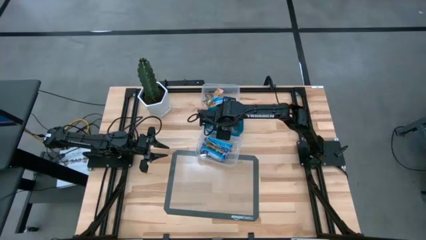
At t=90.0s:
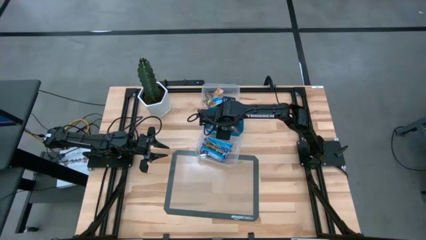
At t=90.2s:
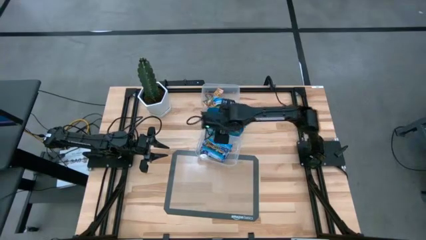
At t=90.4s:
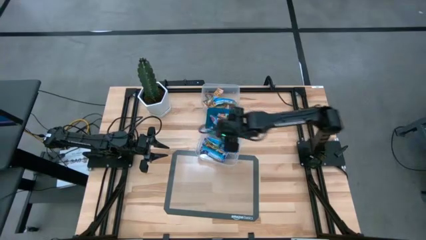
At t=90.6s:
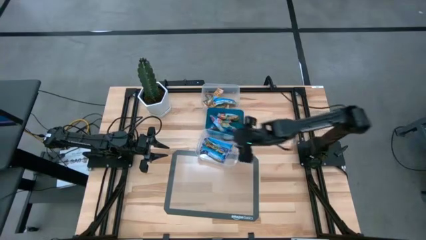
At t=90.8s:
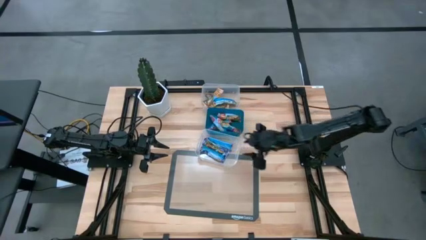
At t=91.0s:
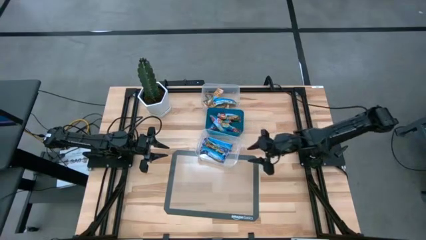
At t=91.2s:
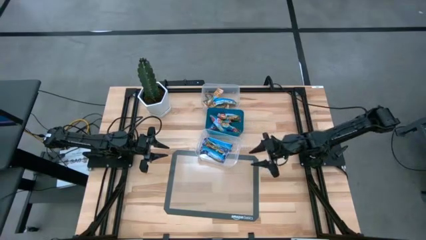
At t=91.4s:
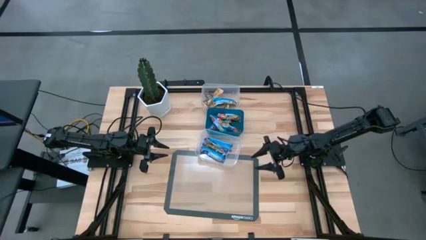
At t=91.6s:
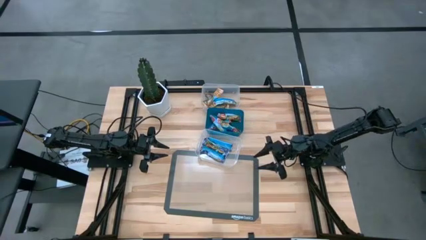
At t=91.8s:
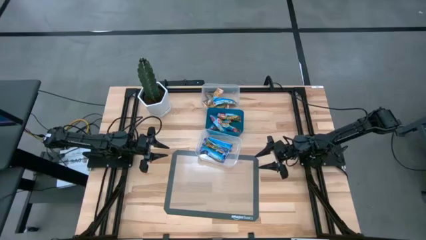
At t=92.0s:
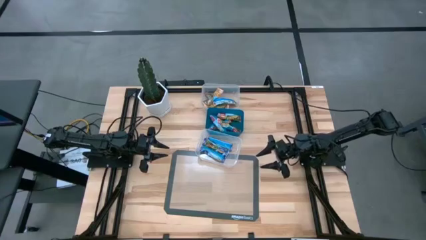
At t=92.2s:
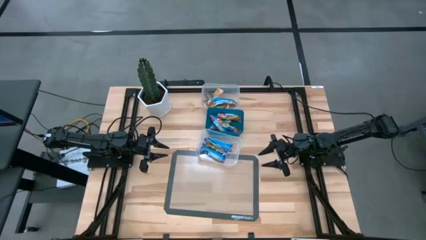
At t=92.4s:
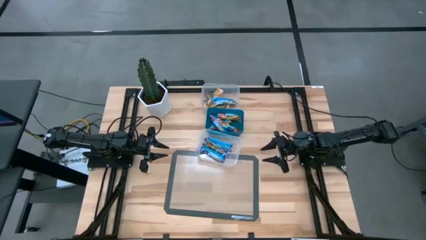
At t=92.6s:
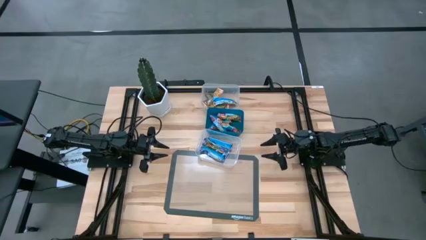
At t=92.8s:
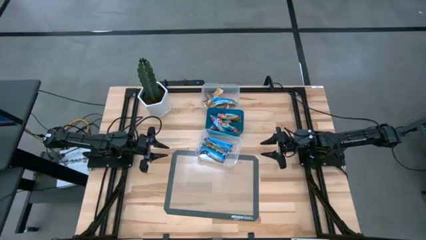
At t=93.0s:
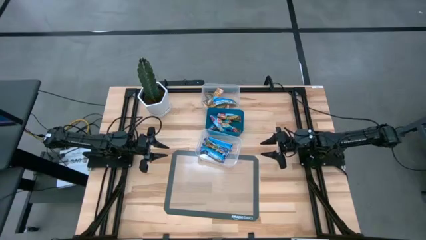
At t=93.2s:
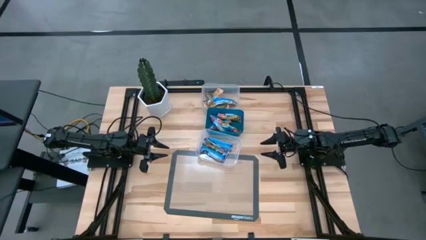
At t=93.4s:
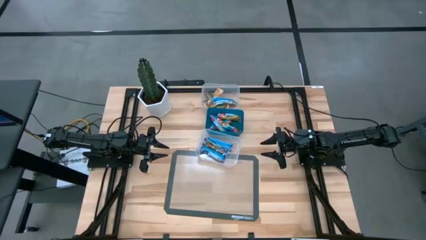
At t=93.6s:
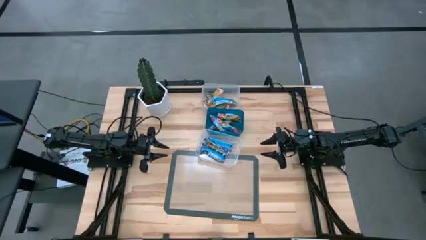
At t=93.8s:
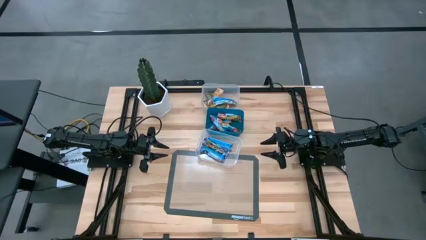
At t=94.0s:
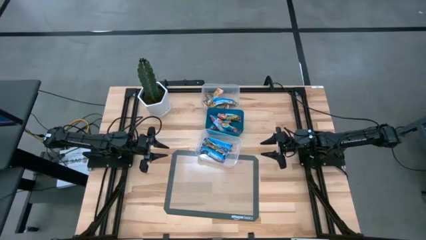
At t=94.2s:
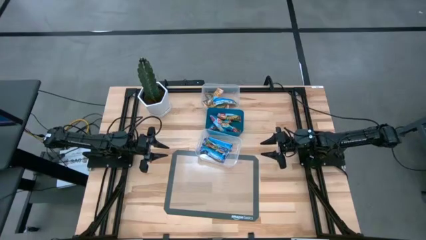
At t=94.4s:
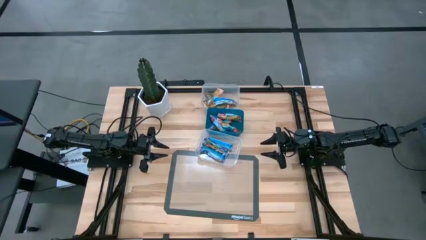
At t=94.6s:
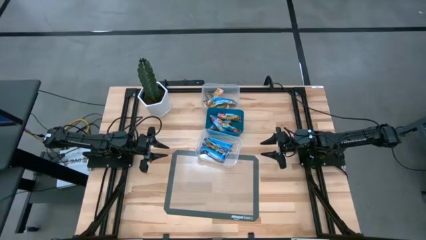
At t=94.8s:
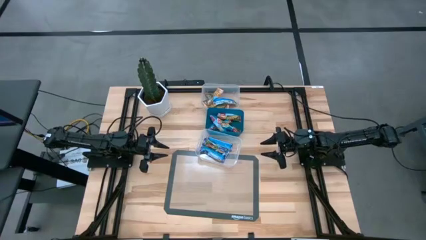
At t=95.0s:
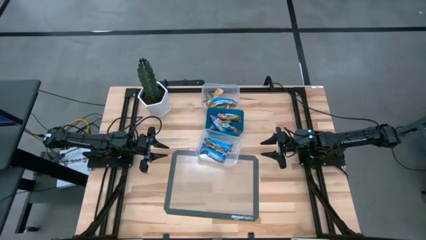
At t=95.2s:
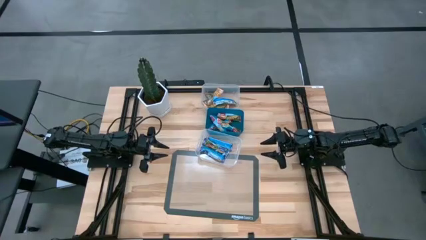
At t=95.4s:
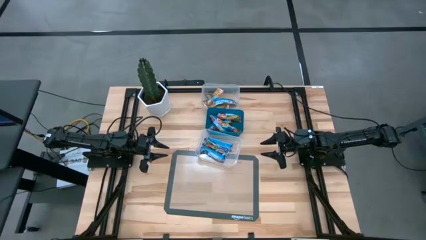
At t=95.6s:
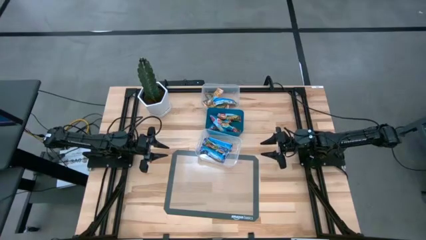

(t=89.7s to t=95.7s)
Task: Pick and place Granola Bars by type
Return to Home Position

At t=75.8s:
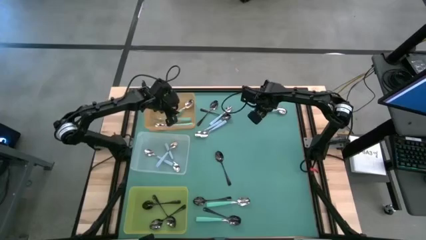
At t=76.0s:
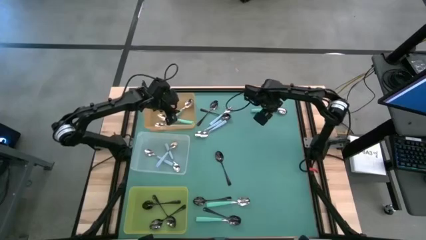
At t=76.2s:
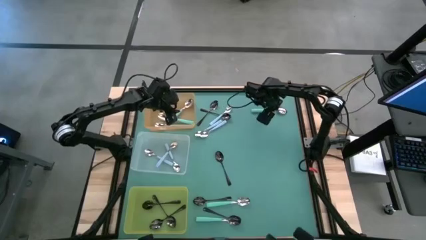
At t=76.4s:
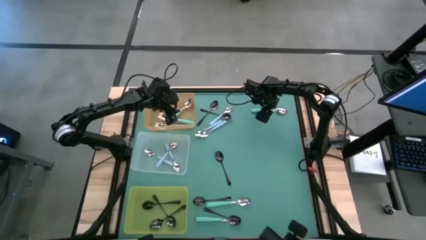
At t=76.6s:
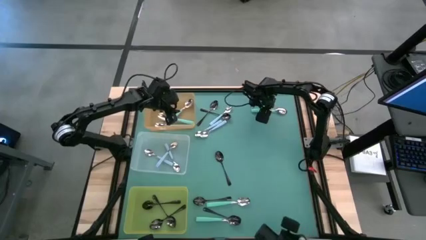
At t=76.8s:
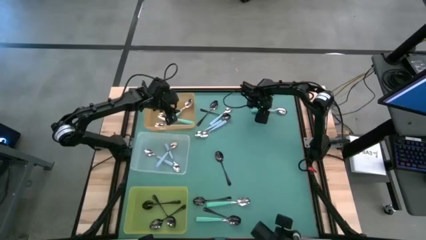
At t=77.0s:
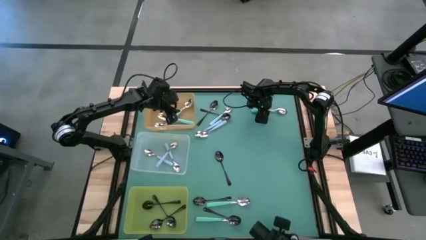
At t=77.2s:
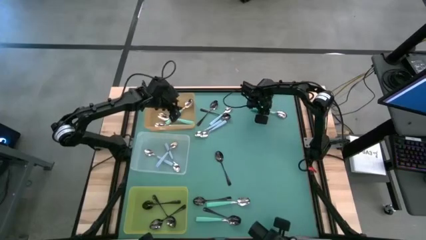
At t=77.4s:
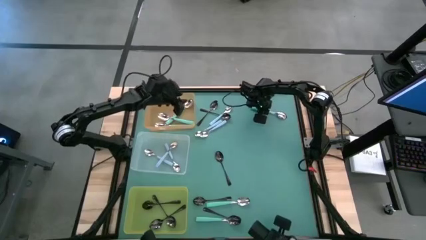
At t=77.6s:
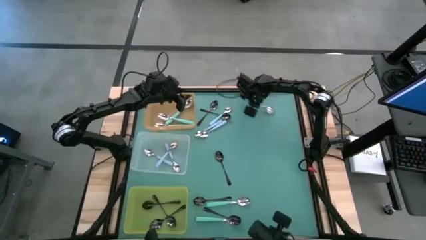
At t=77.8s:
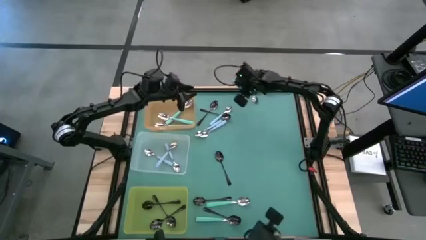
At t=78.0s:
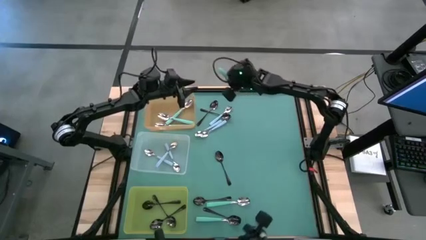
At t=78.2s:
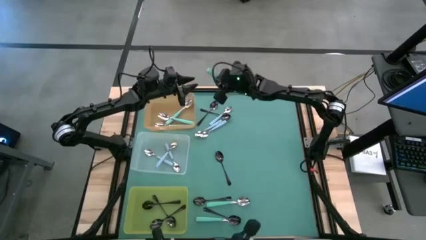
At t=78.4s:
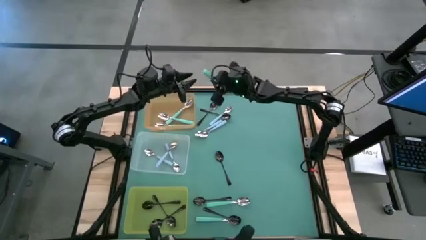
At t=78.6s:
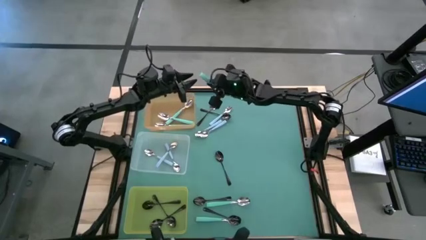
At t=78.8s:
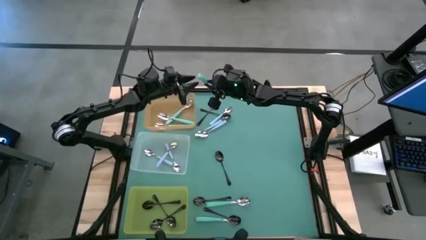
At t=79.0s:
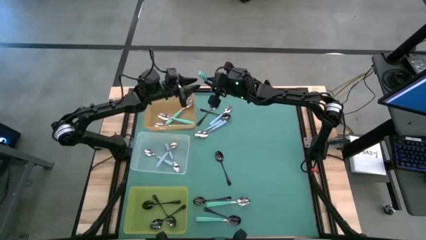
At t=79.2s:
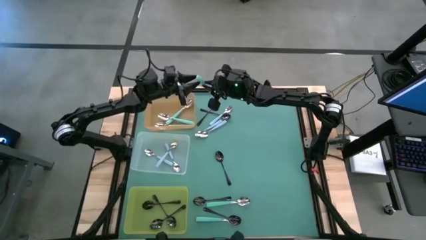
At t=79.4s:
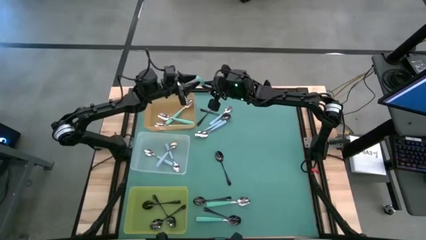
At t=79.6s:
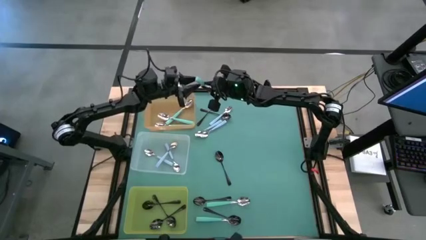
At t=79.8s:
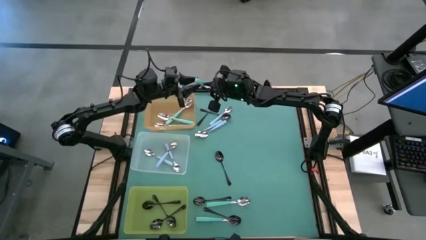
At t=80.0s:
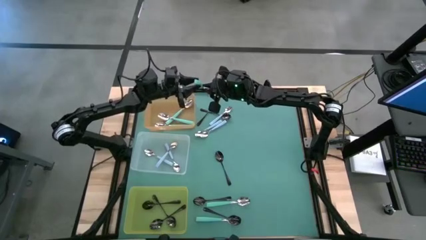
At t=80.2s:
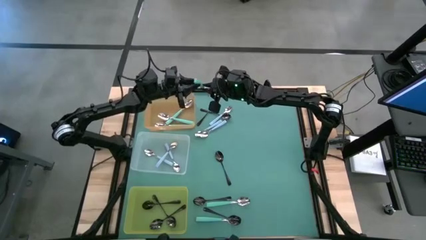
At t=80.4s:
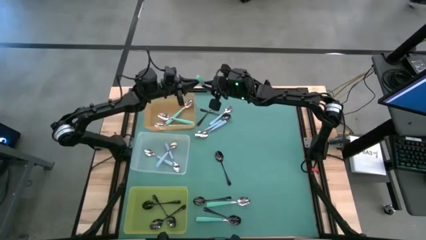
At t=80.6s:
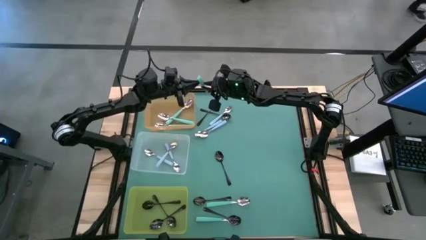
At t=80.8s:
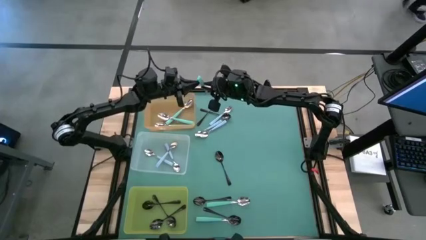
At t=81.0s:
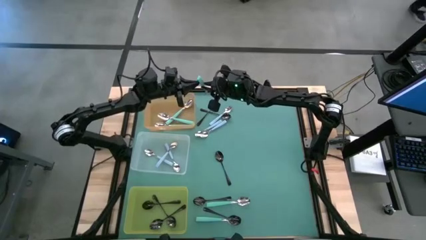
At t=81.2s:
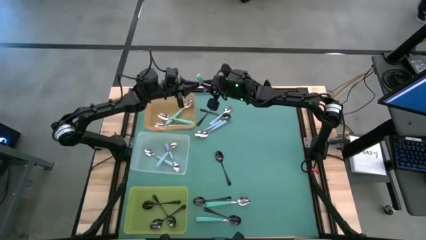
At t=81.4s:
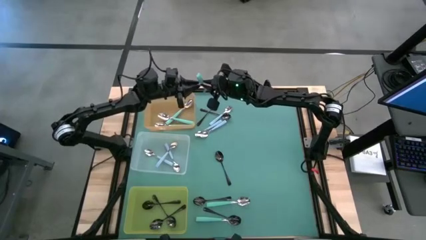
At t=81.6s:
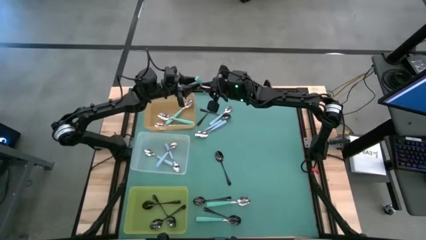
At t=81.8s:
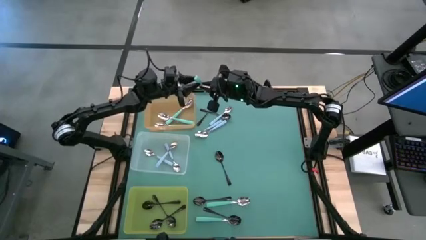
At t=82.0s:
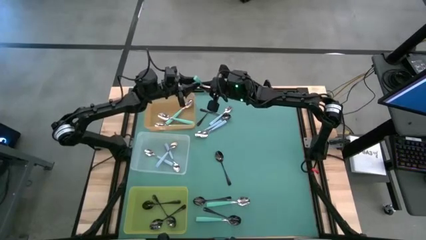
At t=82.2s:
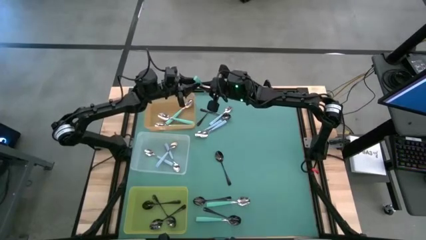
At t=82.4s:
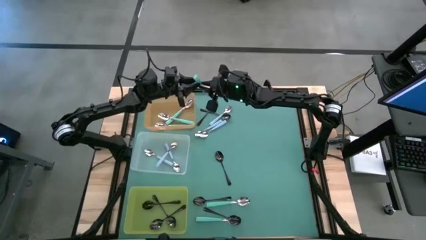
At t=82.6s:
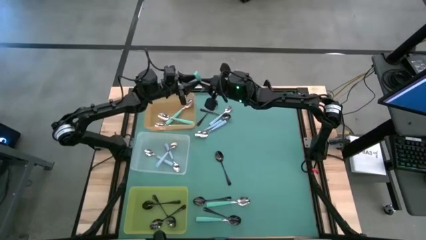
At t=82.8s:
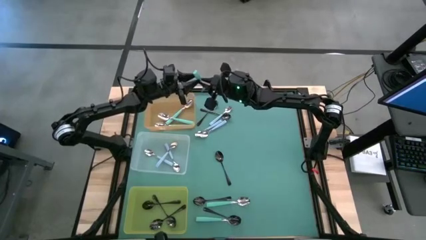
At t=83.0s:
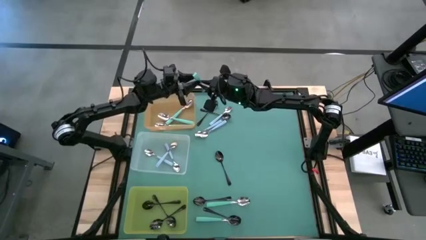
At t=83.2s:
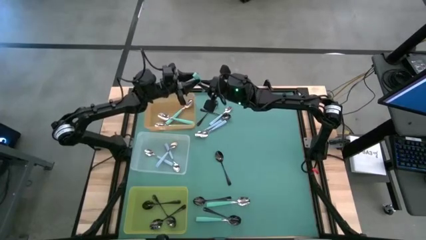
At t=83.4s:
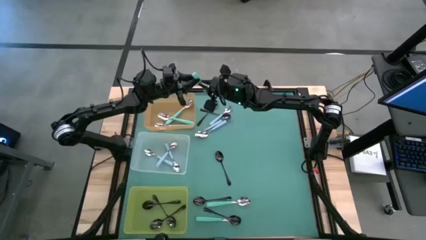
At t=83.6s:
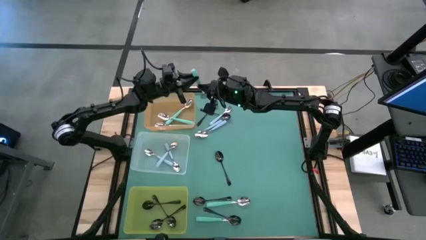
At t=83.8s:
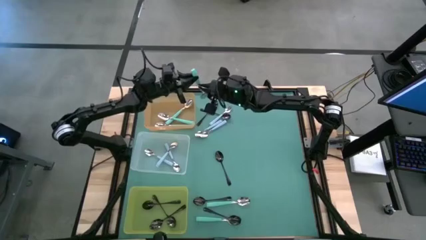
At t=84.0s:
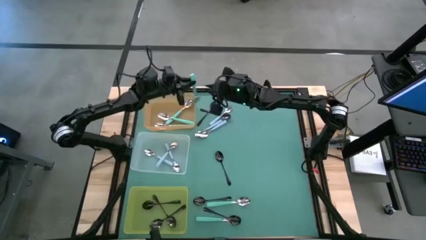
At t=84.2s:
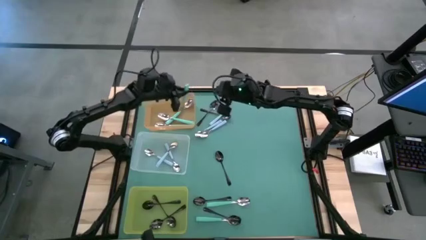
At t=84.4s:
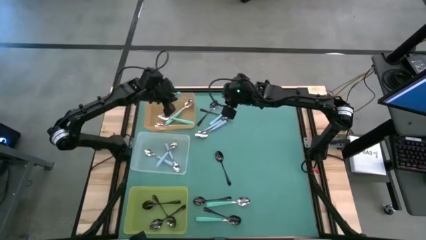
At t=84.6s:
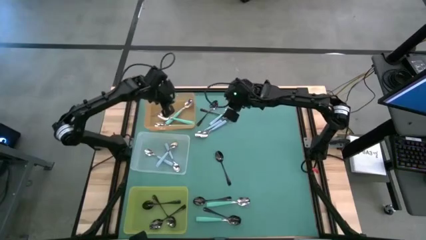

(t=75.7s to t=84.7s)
Task: Sort silverware by color (type)
Put the green spoon into the orange bin
